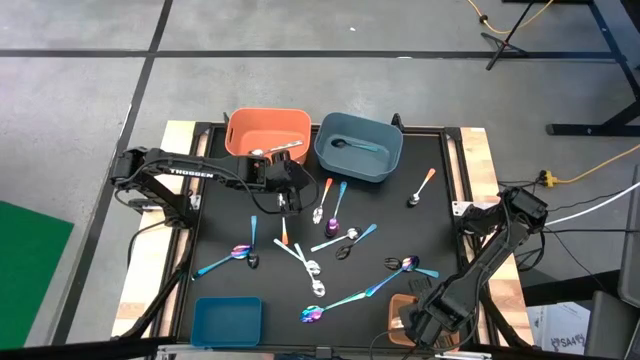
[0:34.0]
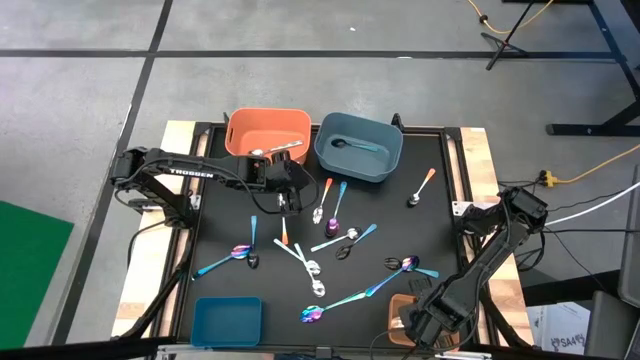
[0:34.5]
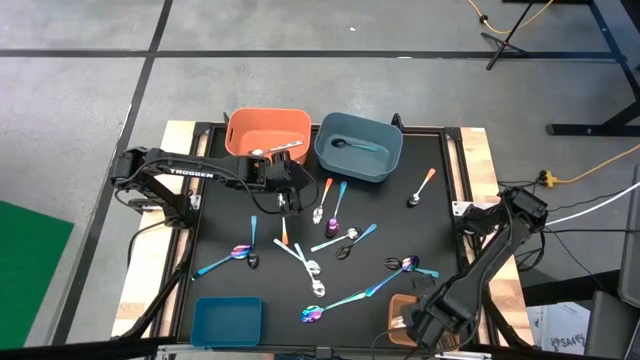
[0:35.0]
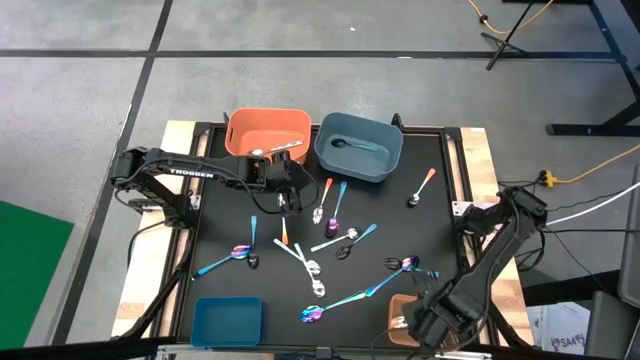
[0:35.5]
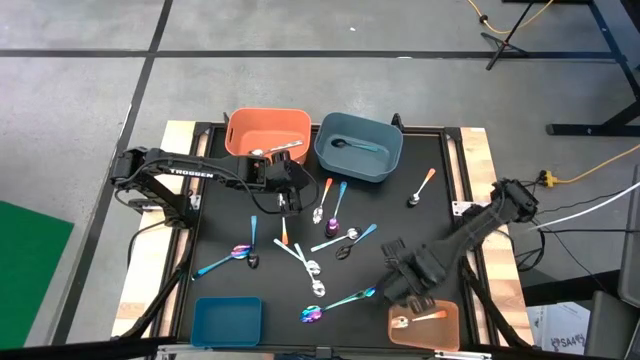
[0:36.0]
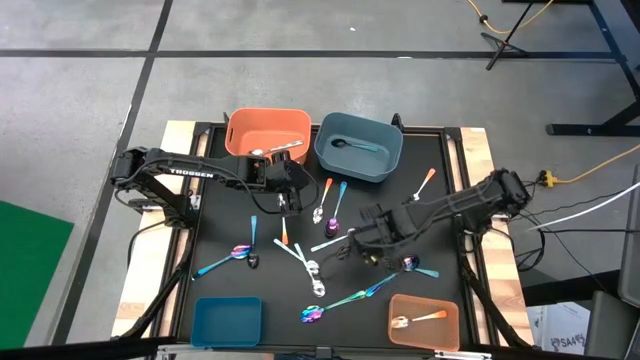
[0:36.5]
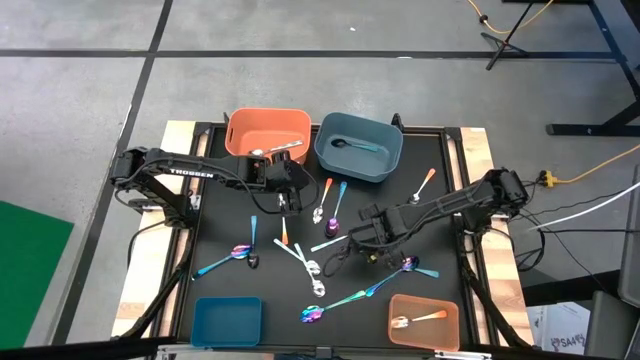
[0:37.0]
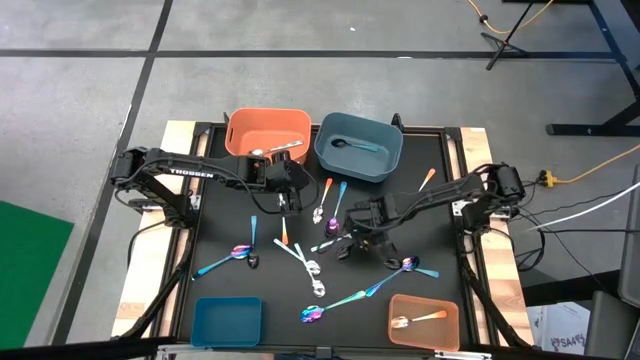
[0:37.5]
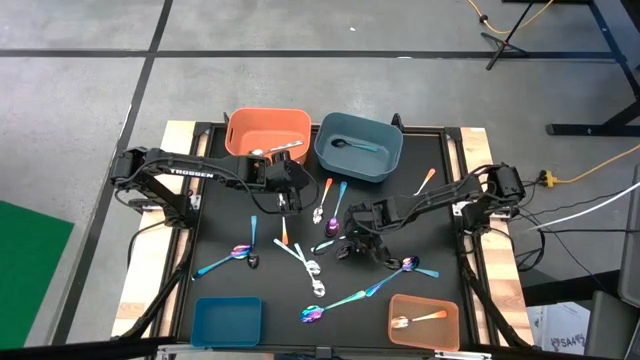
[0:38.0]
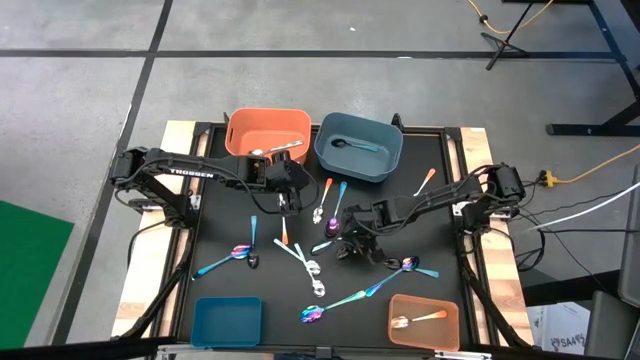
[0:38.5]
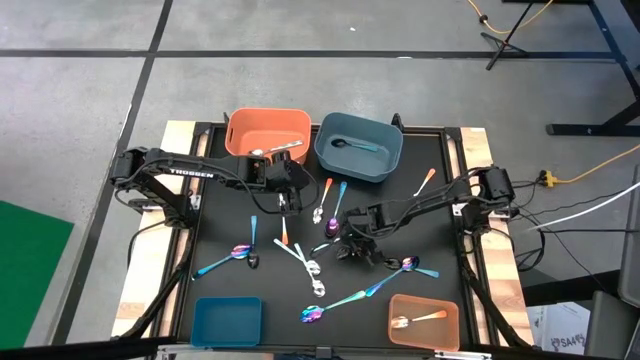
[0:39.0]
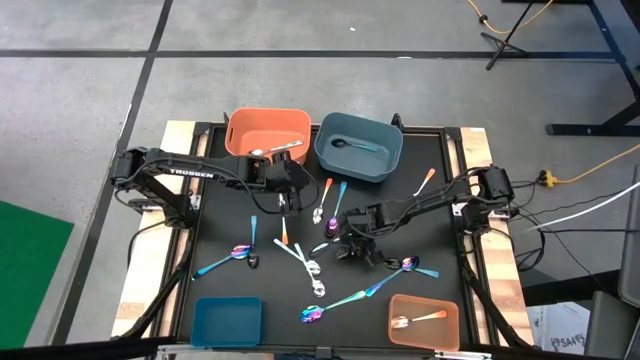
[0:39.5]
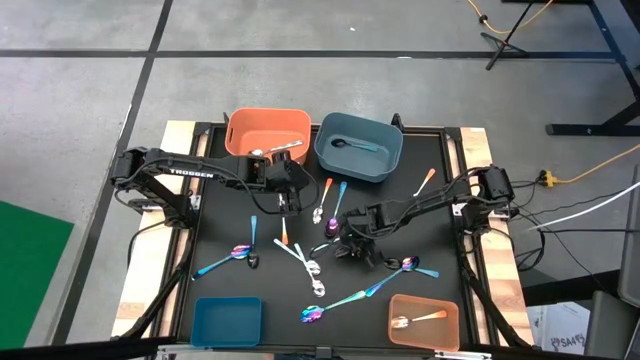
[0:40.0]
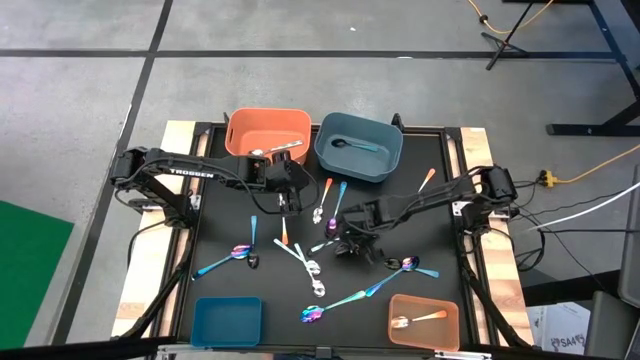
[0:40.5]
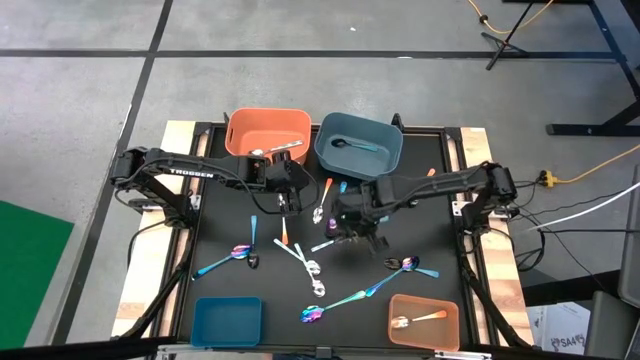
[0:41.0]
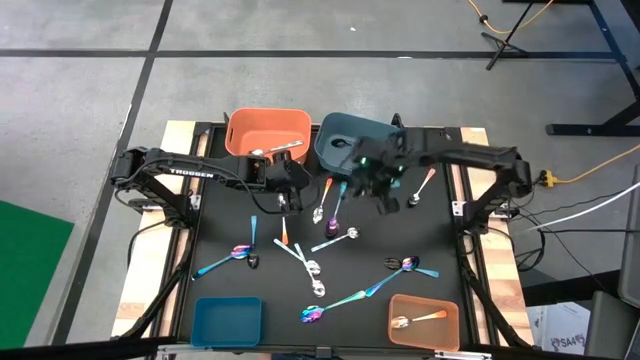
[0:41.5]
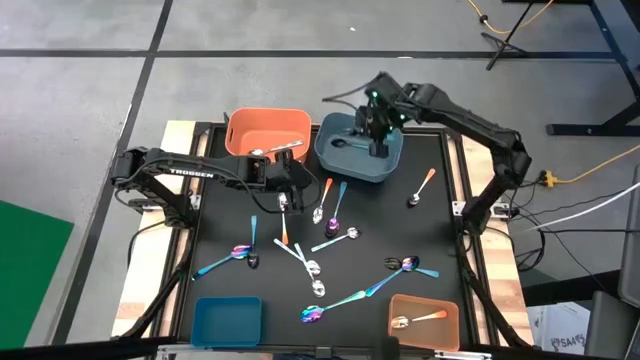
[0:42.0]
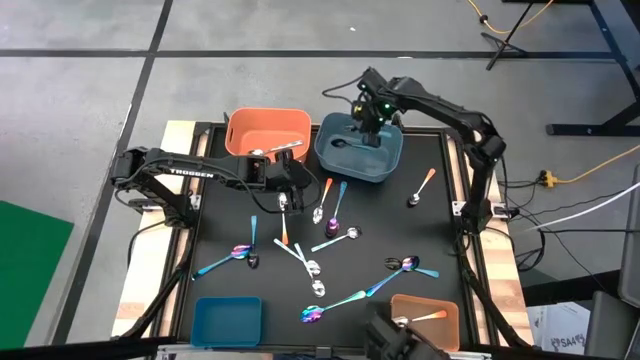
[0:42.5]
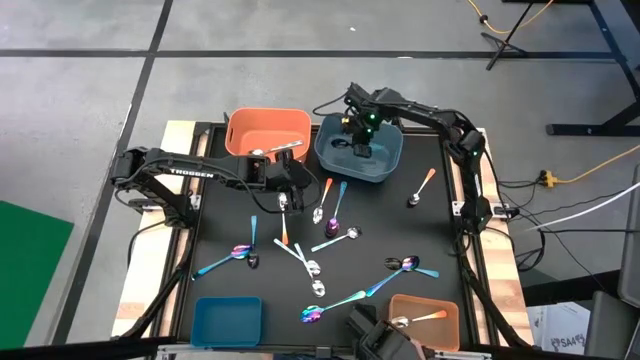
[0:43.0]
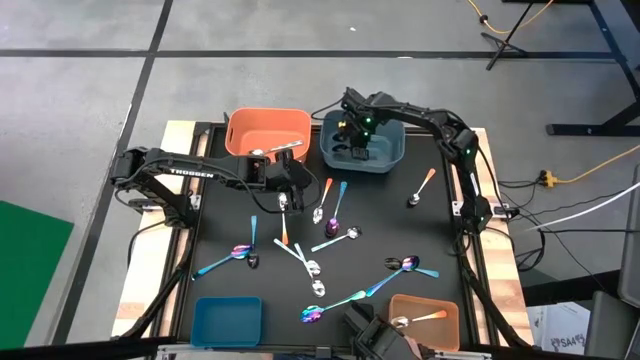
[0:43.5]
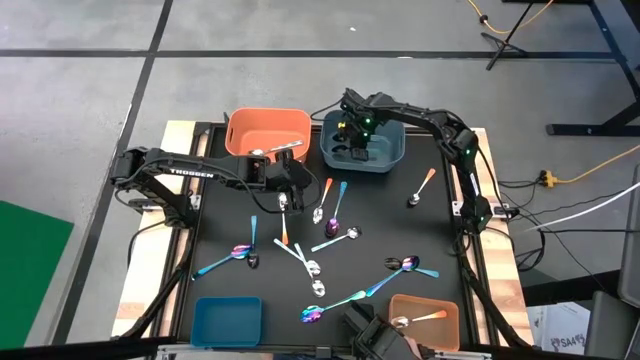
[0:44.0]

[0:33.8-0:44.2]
Task: Sort silverware by color (type)
Put the blue spoon into the top blue bin

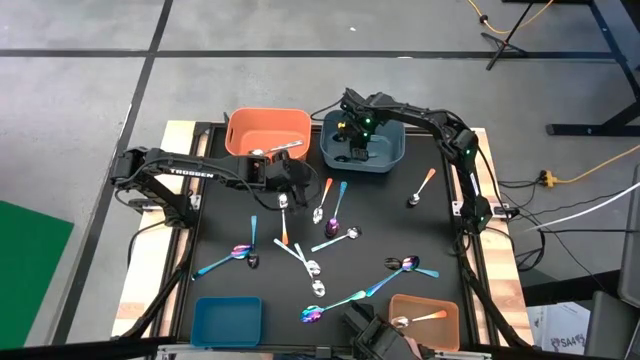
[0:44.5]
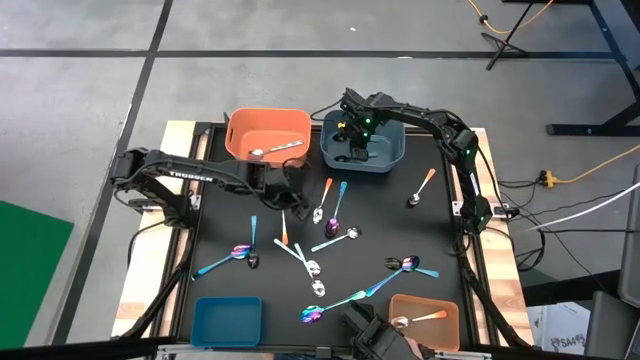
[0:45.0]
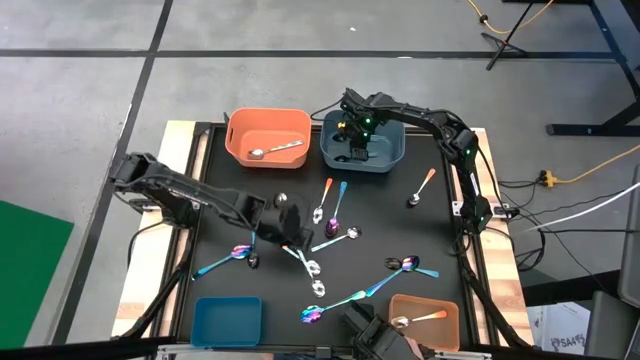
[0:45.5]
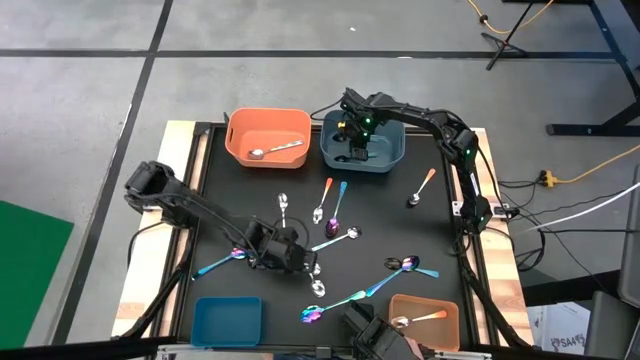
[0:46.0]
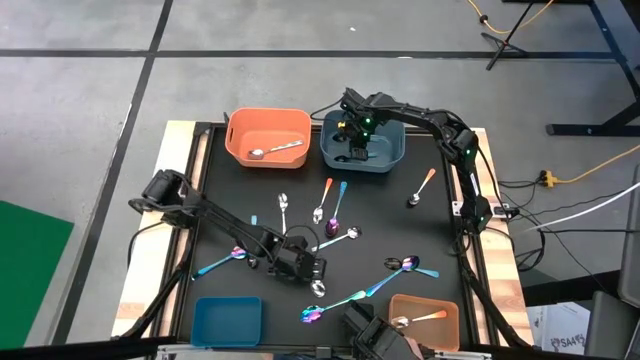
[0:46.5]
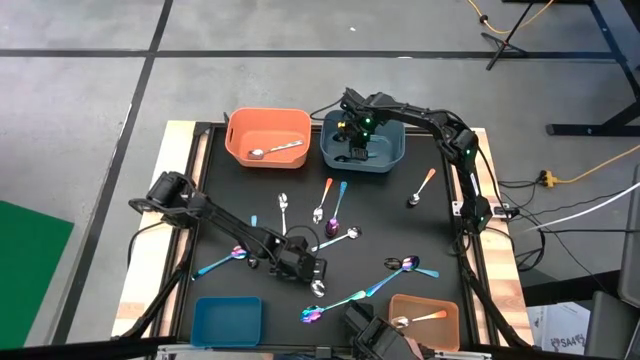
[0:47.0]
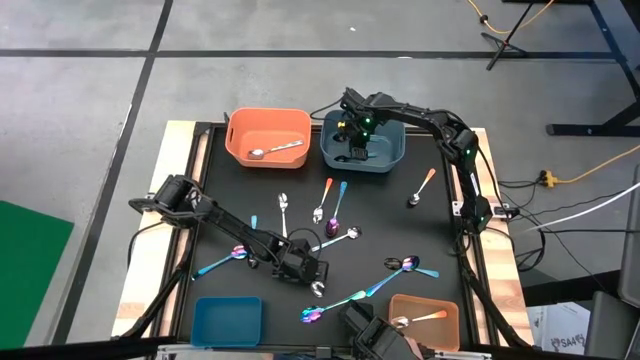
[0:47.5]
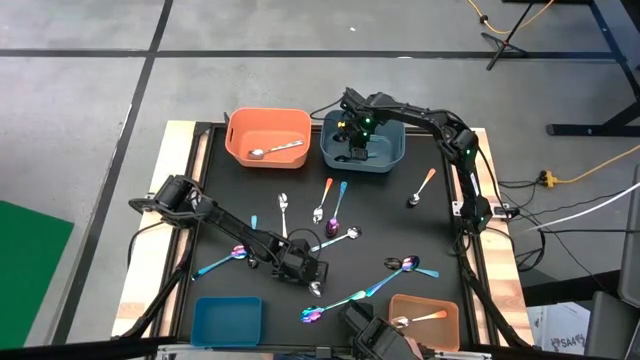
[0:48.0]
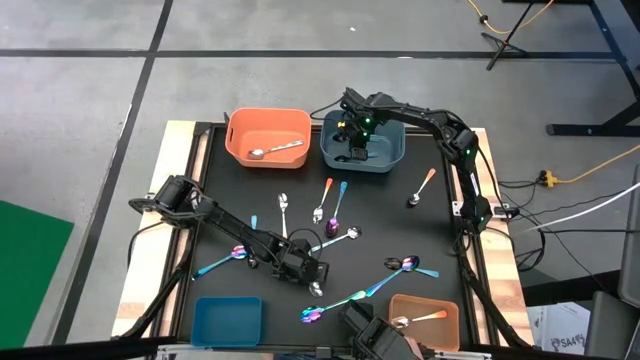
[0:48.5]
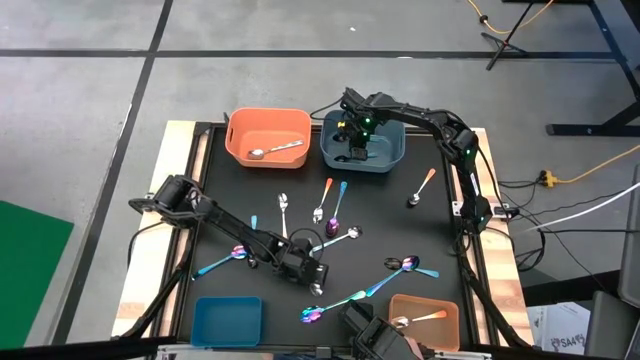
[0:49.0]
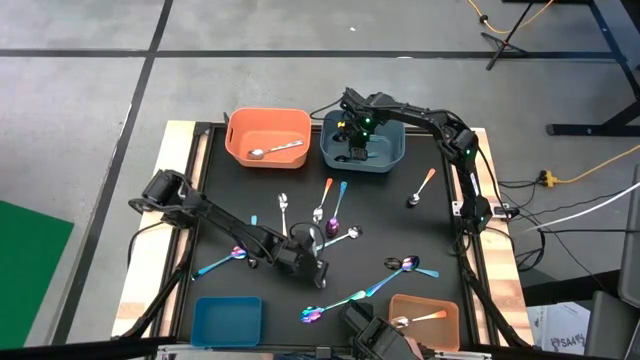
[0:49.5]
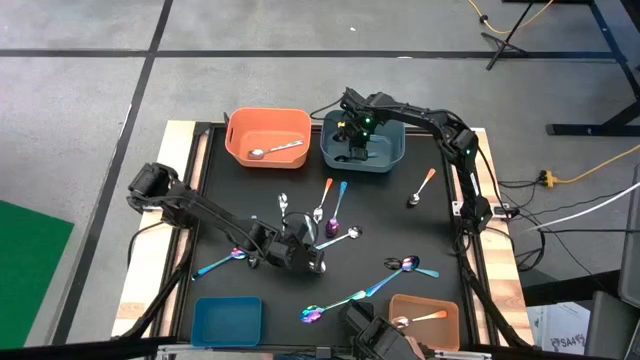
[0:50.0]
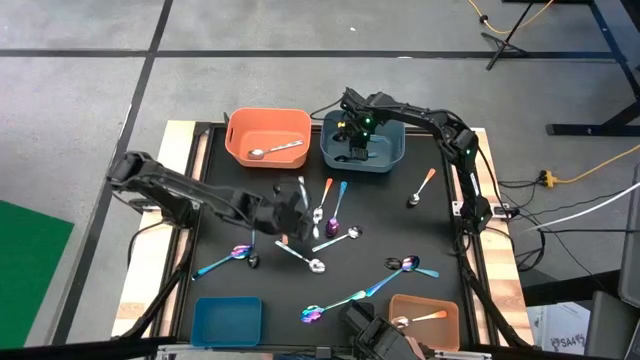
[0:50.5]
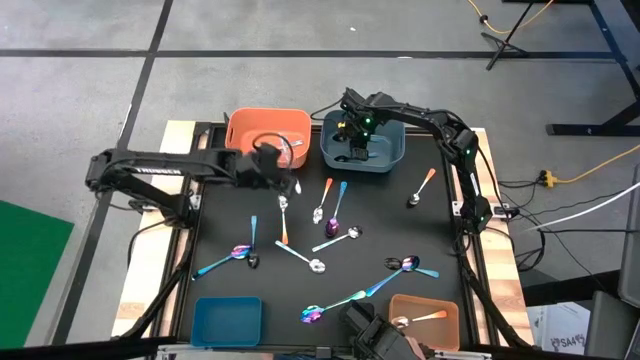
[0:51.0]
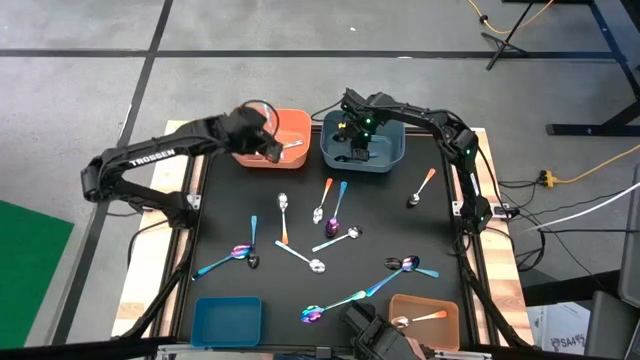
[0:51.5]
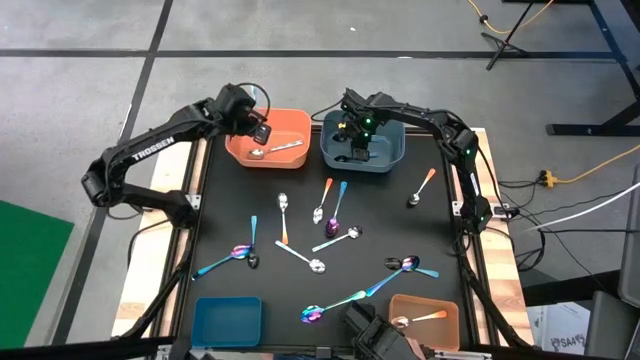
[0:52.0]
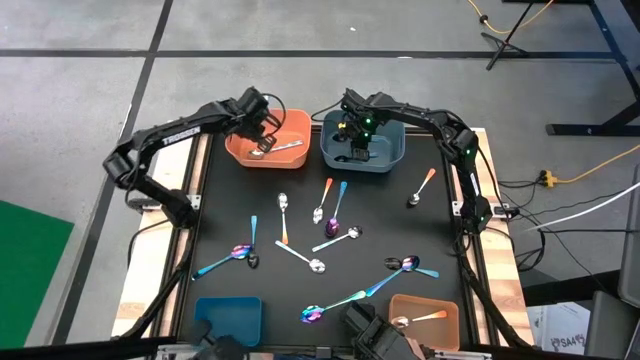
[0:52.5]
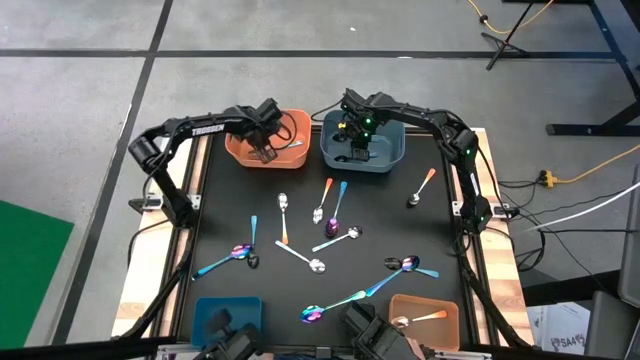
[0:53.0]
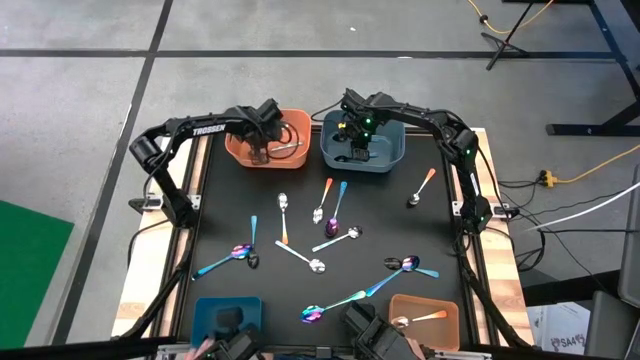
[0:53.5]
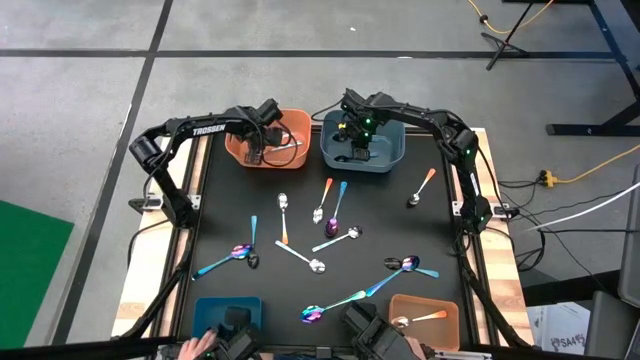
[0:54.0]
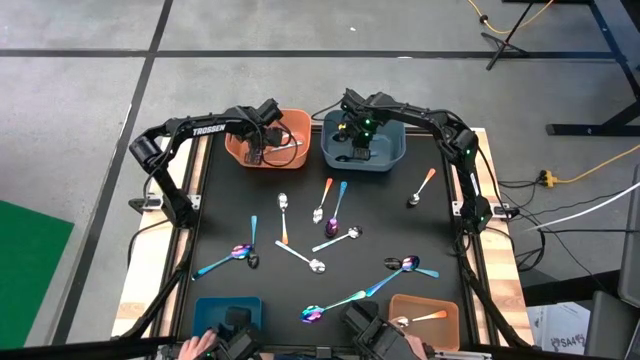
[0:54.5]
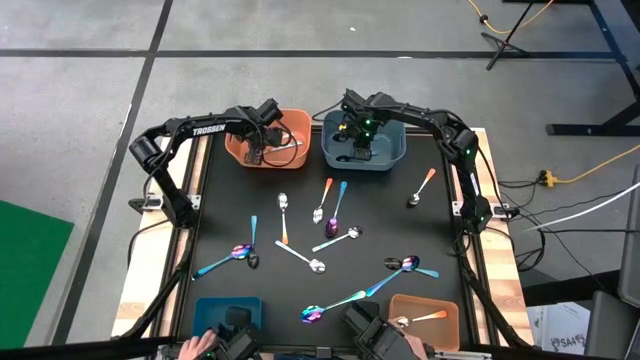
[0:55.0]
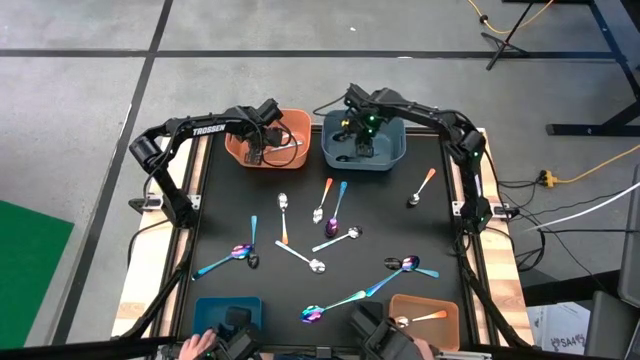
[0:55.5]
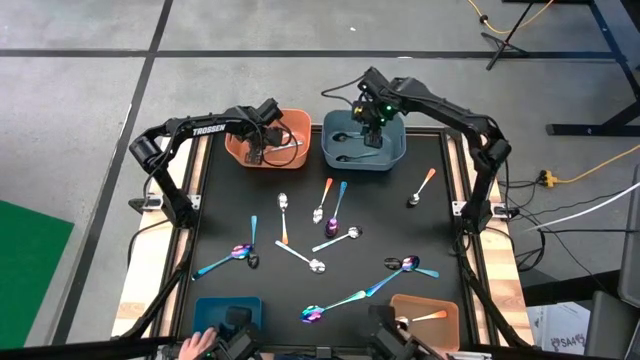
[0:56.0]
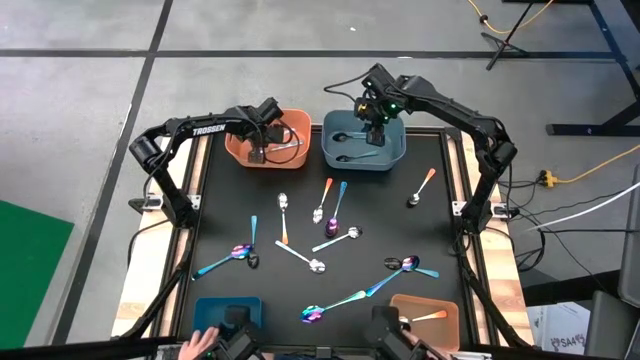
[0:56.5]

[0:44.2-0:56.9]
Put the white patterned spoon into the top orange bin
